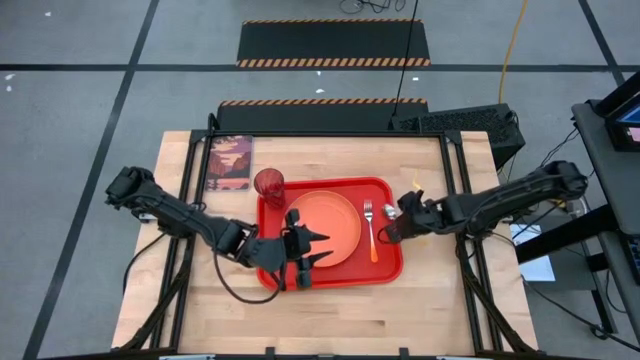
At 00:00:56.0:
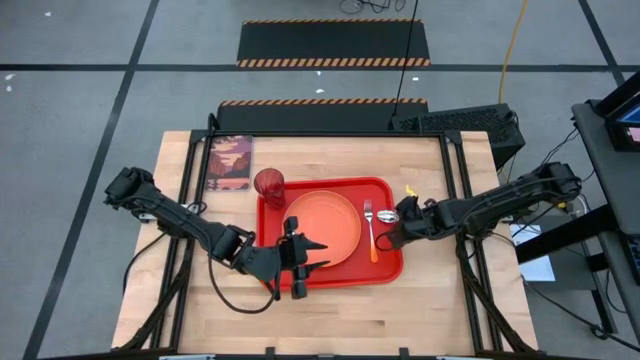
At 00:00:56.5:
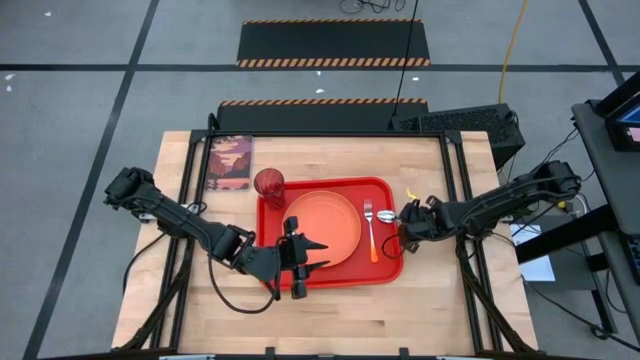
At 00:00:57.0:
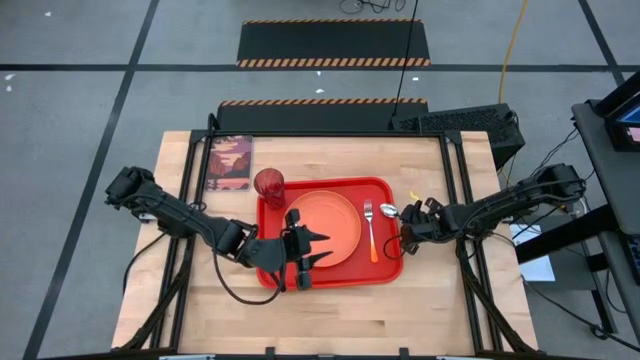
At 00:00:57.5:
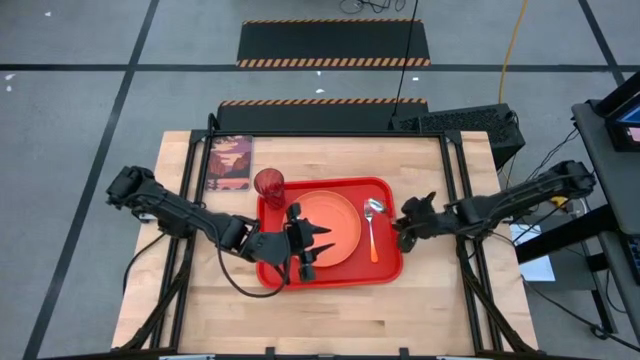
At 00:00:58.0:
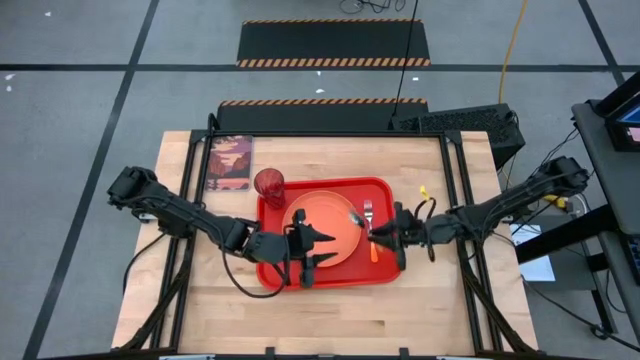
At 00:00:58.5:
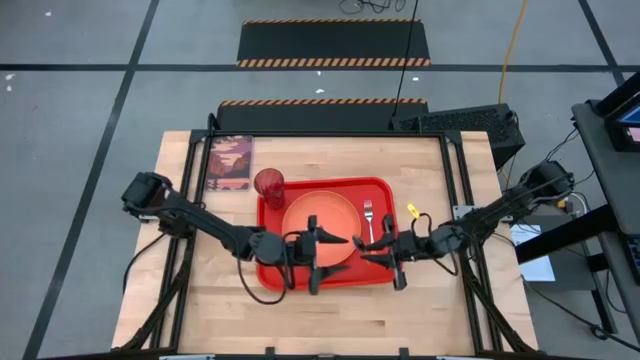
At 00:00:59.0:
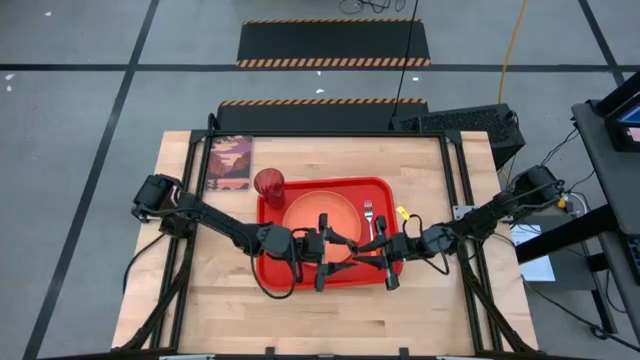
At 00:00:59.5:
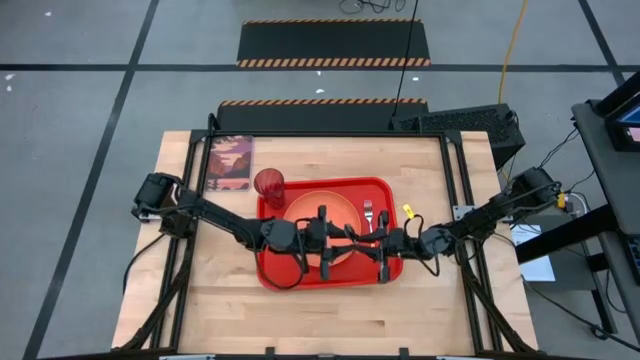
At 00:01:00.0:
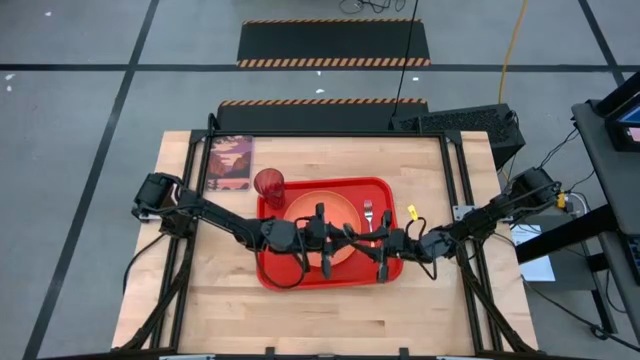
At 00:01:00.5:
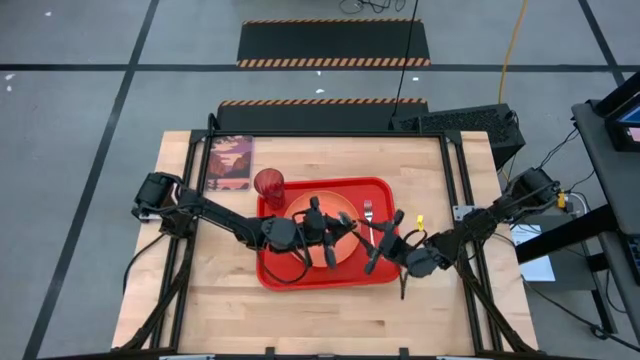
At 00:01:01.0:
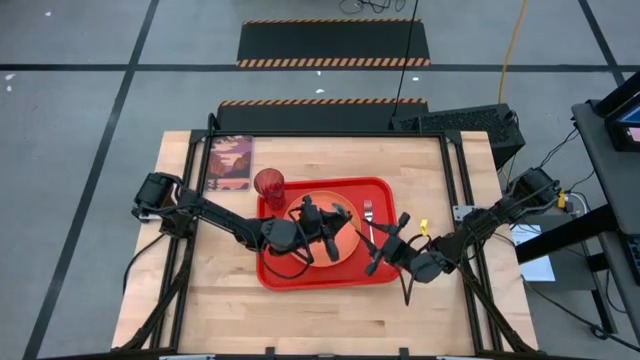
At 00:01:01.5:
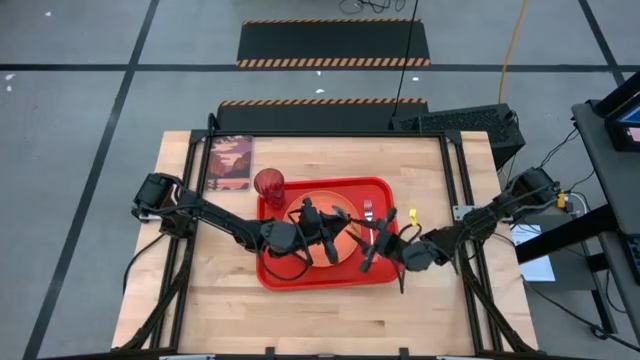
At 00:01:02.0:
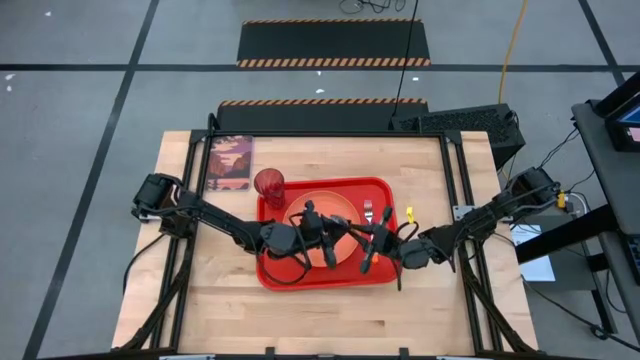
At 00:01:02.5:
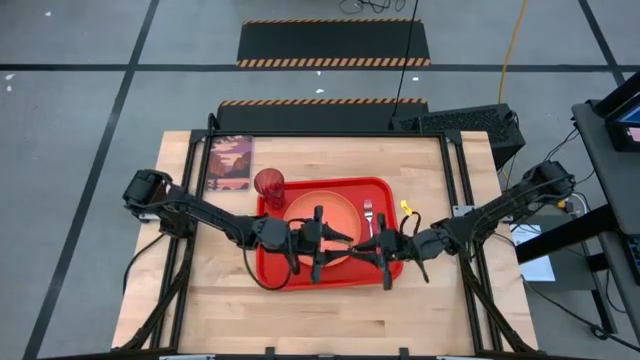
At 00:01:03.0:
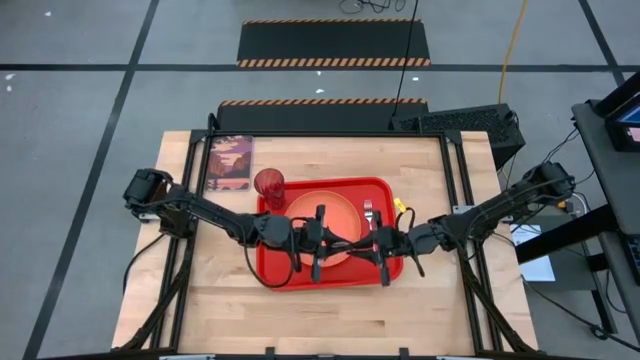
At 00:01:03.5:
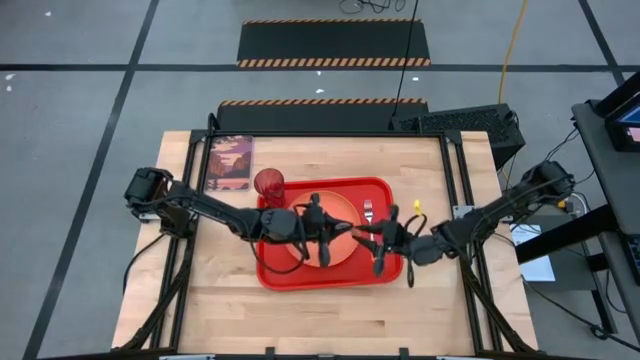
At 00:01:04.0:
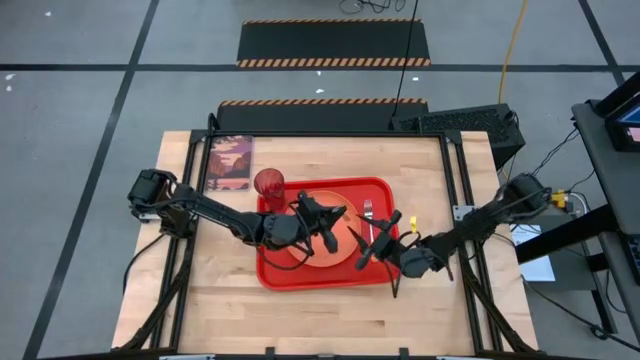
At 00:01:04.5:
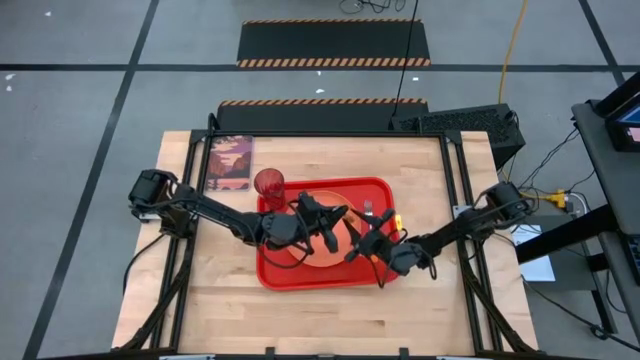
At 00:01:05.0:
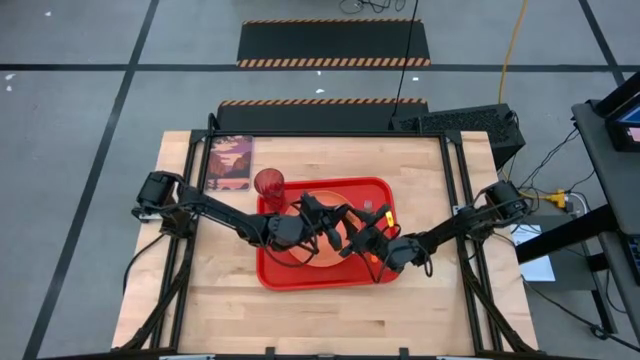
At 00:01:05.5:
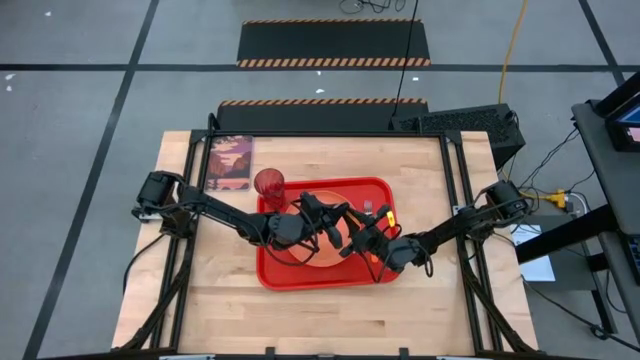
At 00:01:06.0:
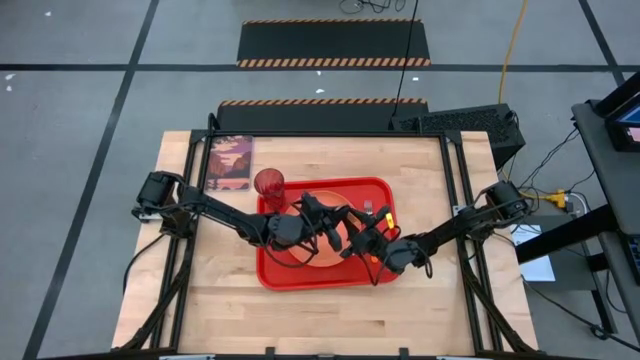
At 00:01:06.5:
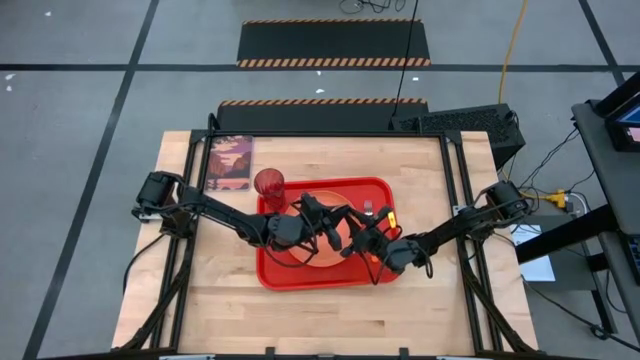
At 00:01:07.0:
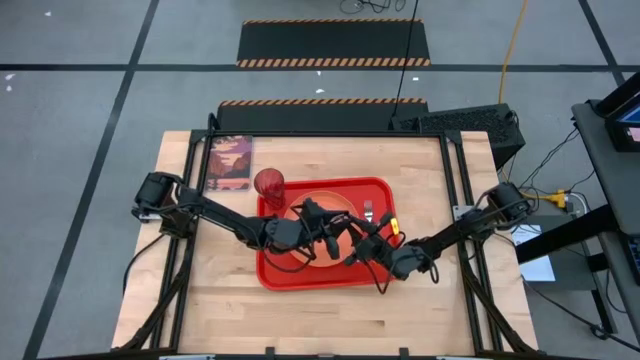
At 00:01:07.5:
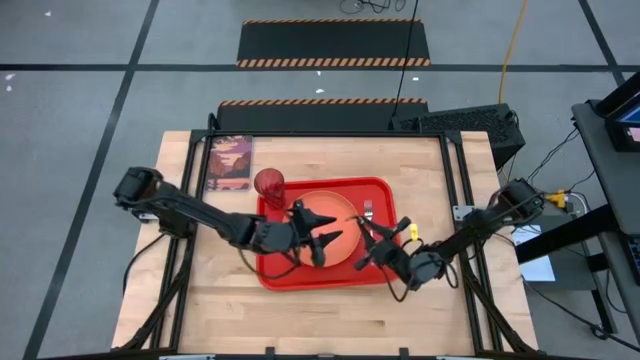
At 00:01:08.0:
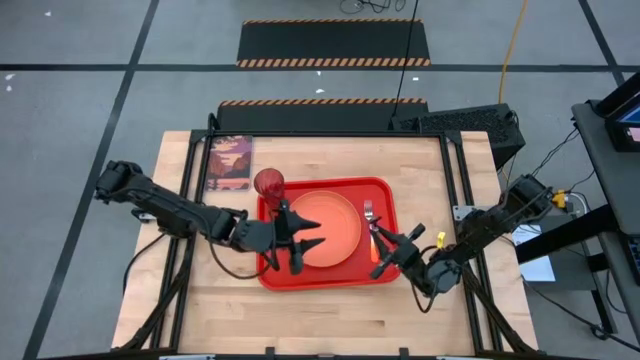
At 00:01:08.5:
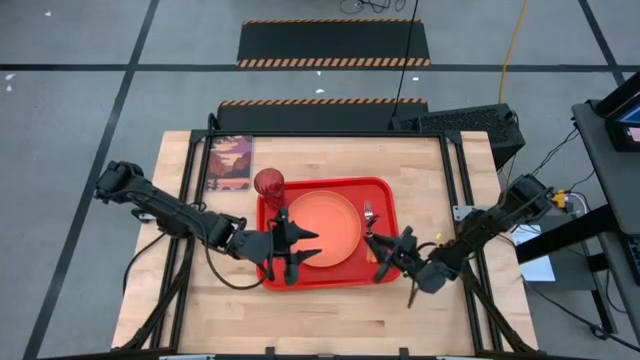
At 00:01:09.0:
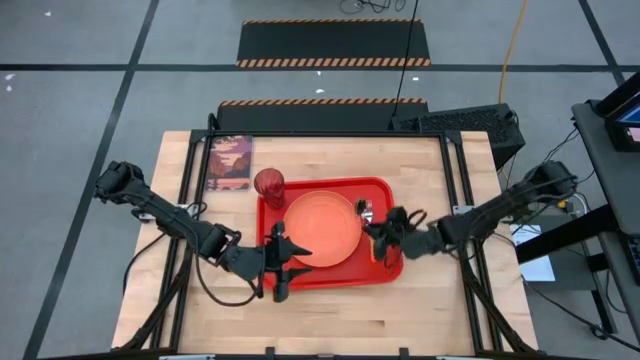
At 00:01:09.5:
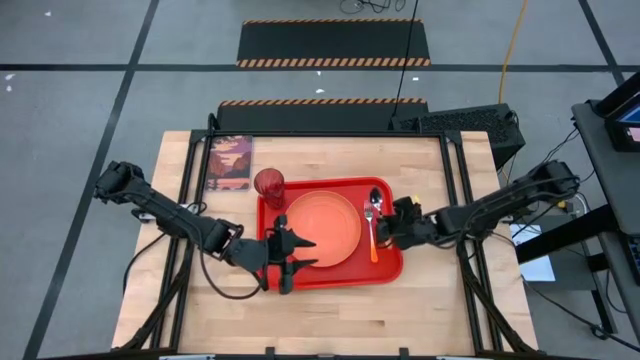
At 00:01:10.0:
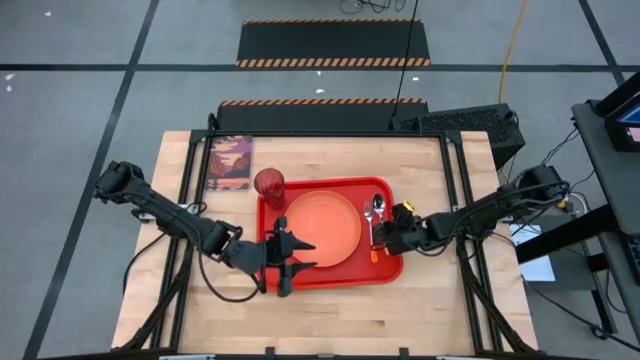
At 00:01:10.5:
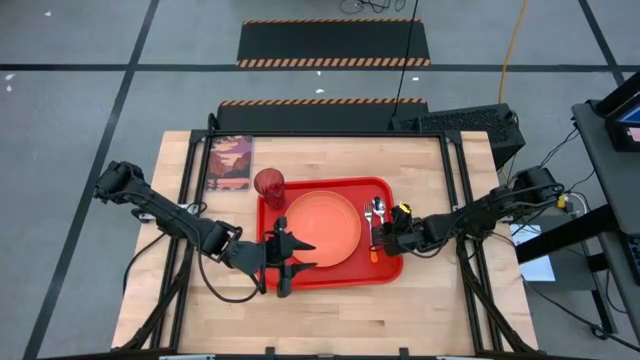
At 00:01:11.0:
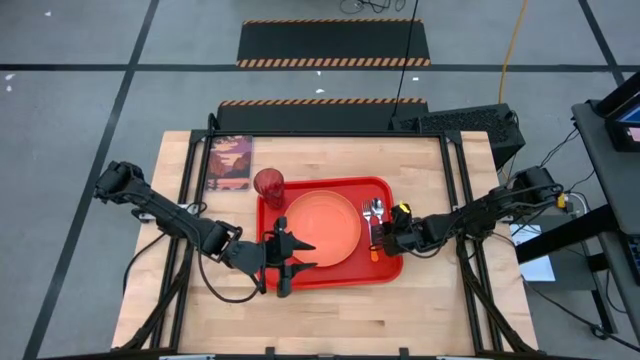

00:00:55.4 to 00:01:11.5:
Task: Pick and place plate/cup/fork/spoon on tray
Put the orange spoon on the right side of the white orange fork

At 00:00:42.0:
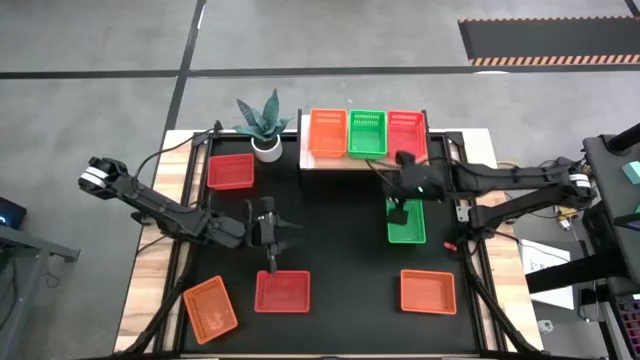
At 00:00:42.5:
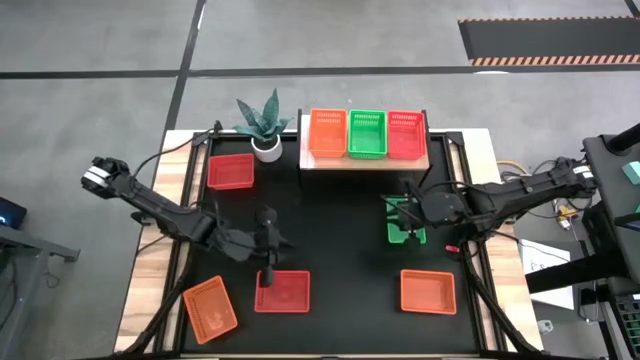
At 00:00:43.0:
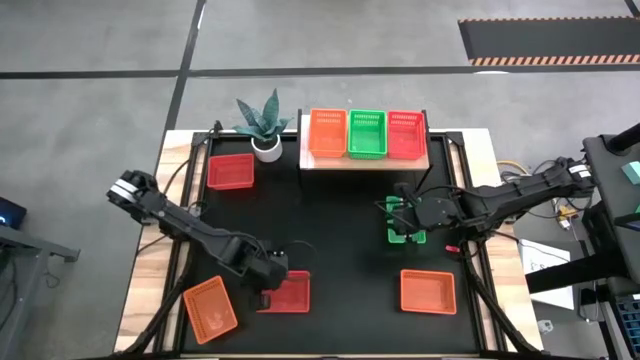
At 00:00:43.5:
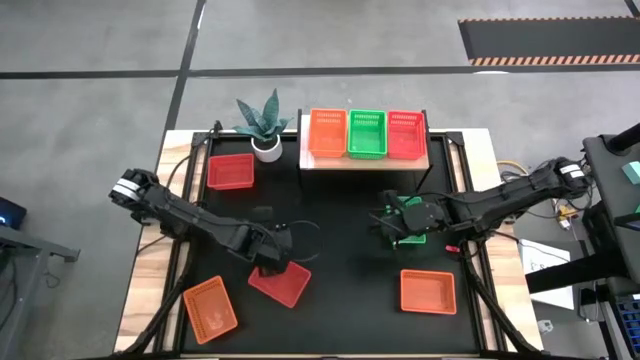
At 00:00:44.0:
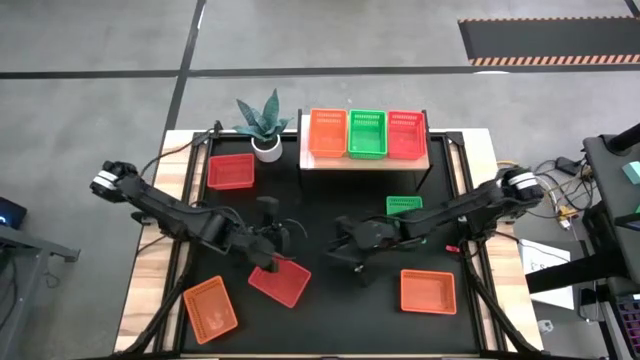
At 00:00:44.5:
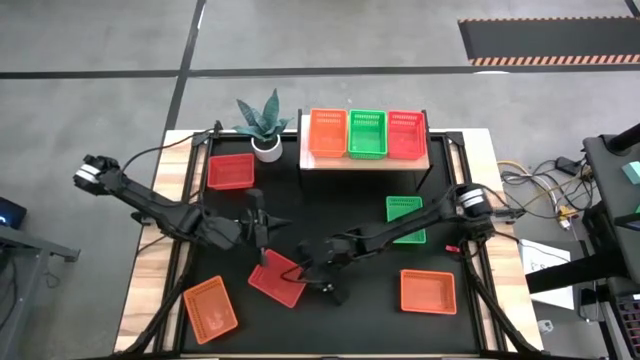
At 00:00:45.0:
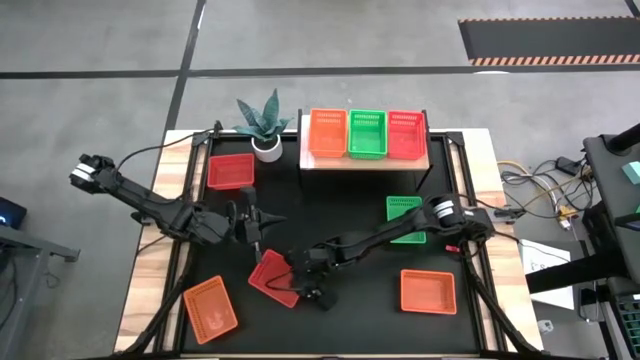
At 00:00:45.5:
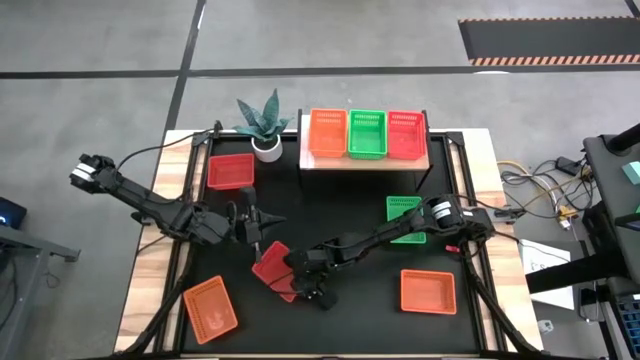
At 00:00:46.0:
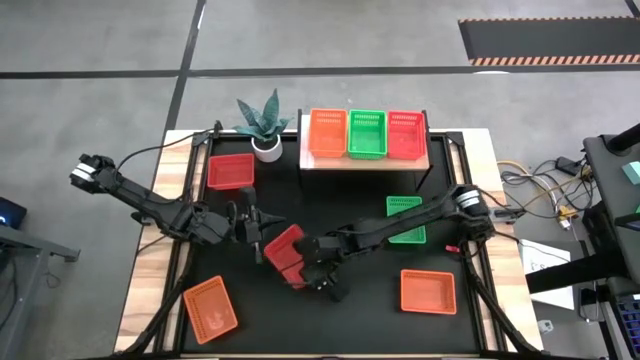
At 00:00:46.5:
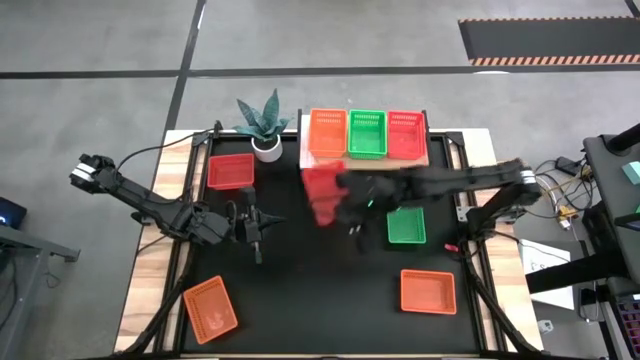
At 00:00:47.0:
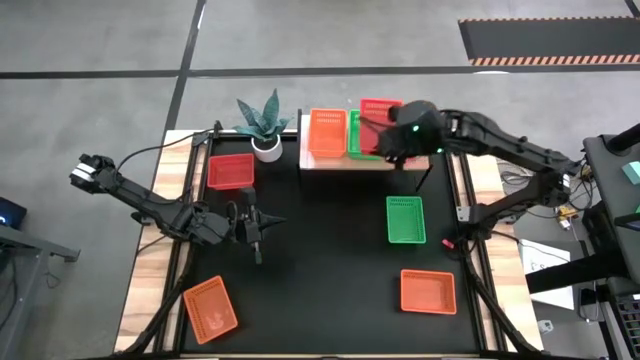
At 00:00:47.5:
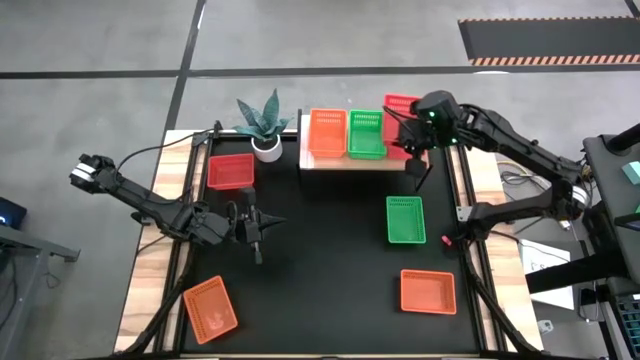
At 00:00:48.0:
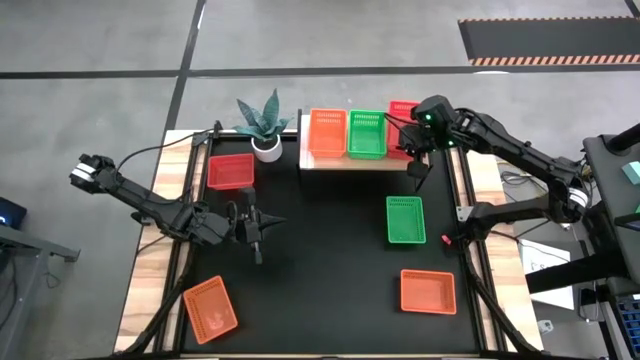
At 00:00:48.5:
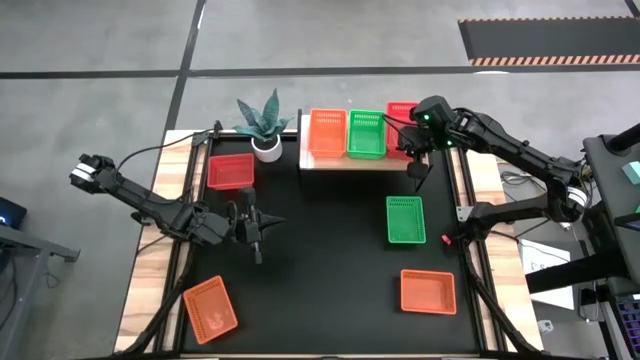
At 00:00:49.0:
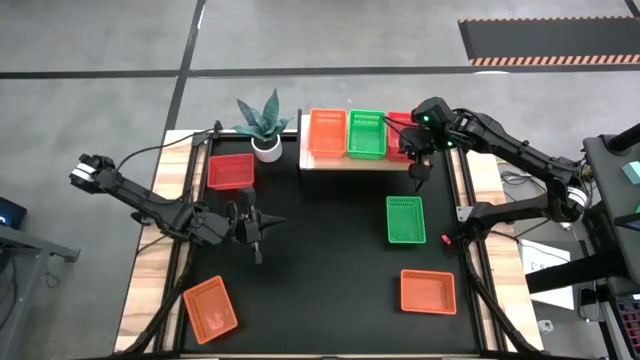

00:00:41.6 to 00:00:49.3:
Task: Stack baskets on shelf by color
Stack the bottom red bin on top of the red bin on the shelf
